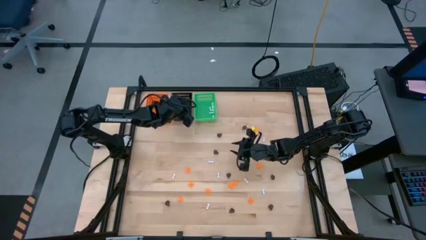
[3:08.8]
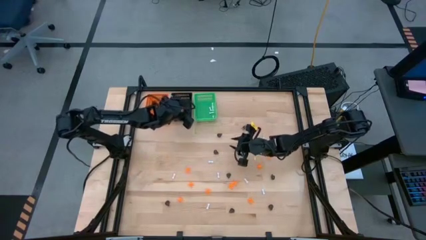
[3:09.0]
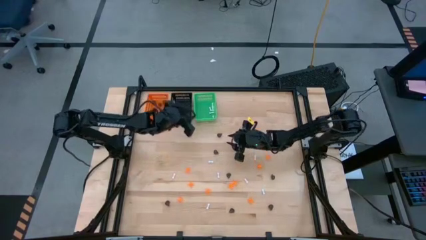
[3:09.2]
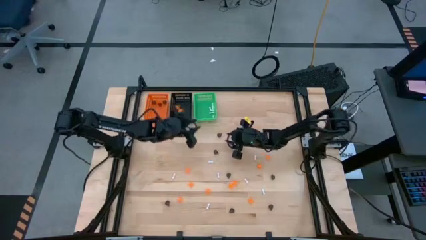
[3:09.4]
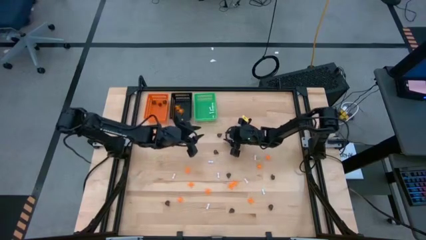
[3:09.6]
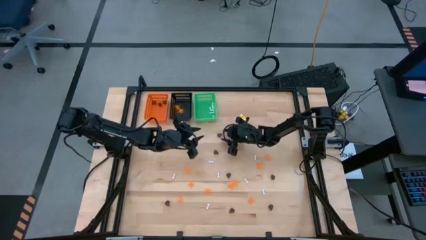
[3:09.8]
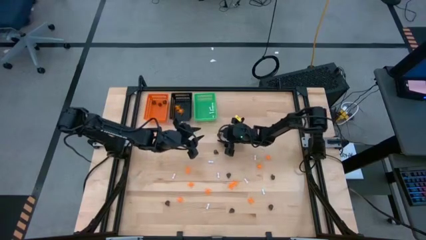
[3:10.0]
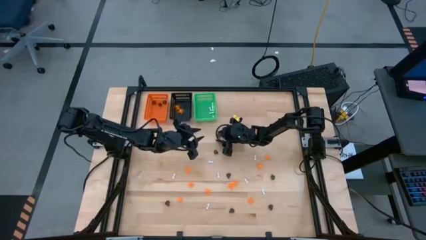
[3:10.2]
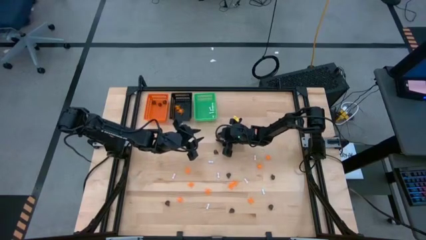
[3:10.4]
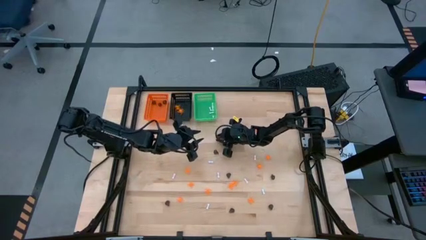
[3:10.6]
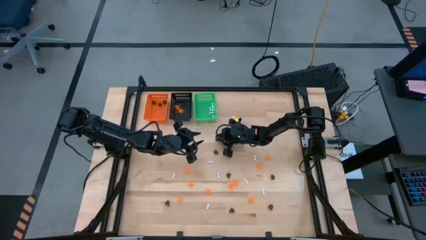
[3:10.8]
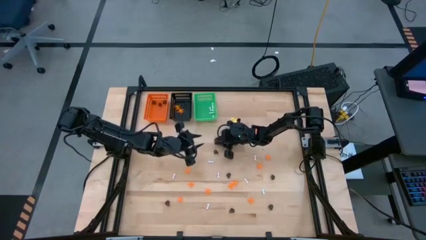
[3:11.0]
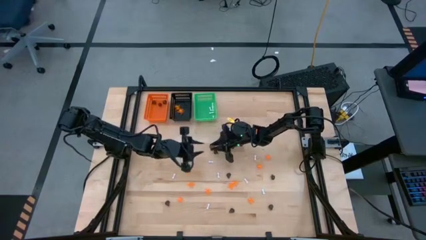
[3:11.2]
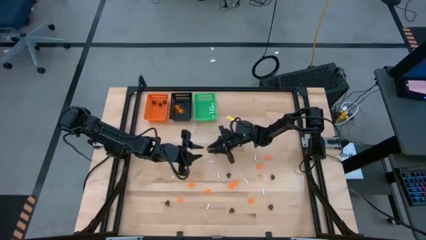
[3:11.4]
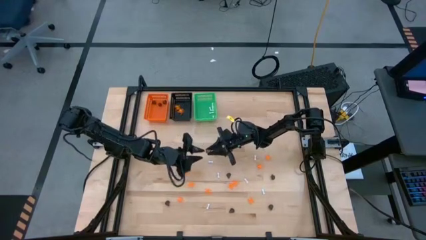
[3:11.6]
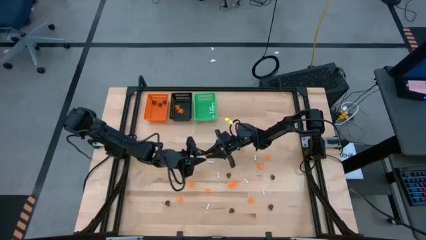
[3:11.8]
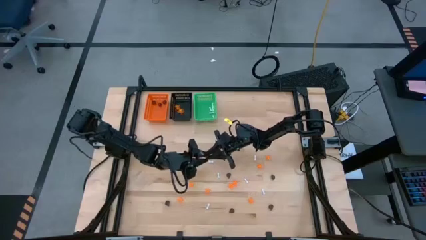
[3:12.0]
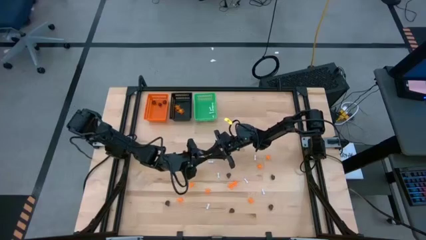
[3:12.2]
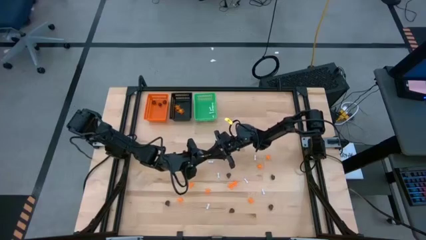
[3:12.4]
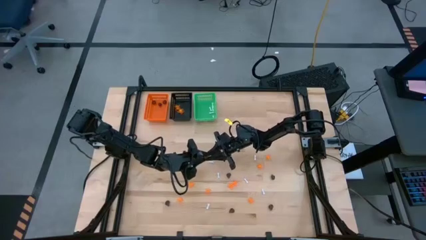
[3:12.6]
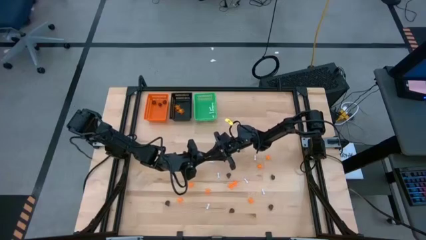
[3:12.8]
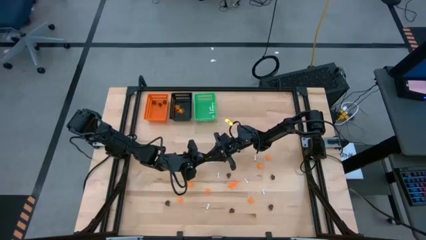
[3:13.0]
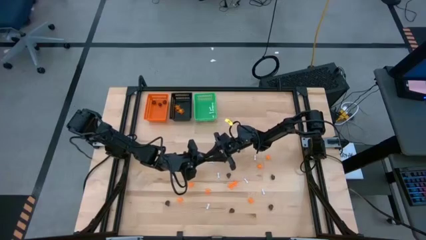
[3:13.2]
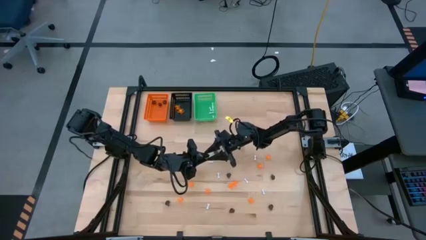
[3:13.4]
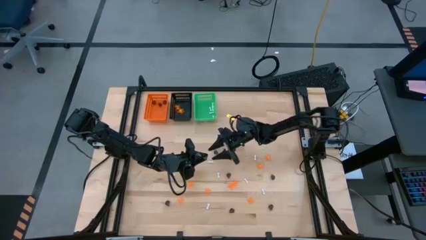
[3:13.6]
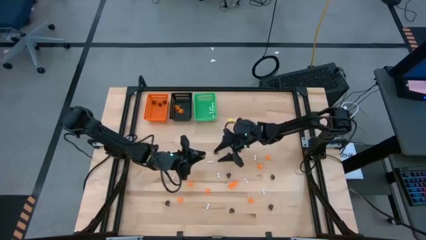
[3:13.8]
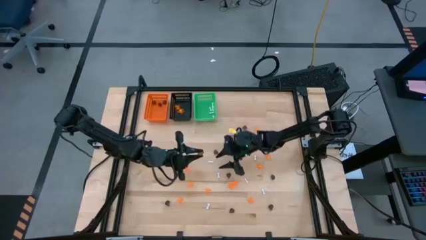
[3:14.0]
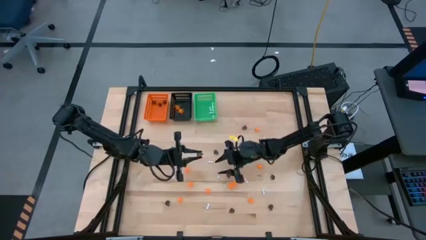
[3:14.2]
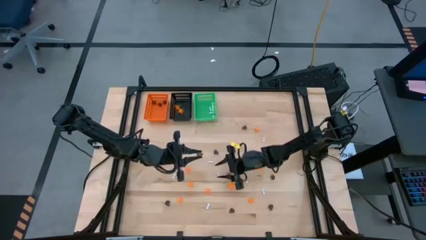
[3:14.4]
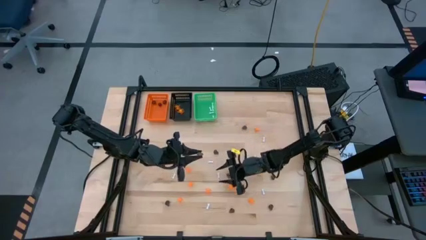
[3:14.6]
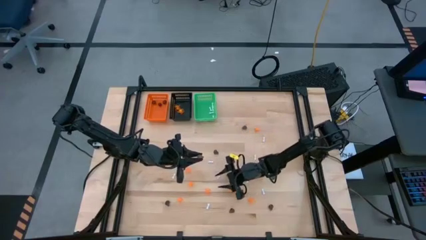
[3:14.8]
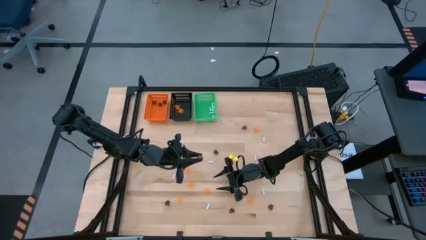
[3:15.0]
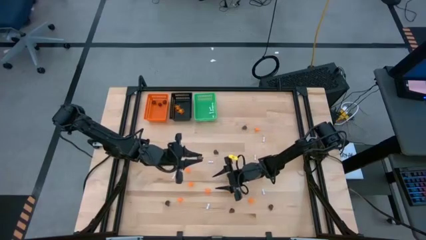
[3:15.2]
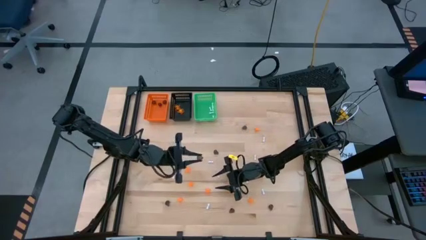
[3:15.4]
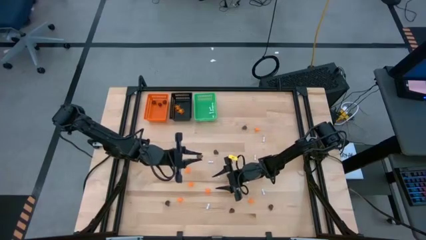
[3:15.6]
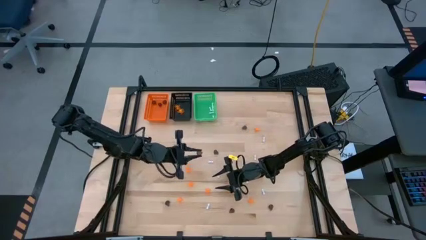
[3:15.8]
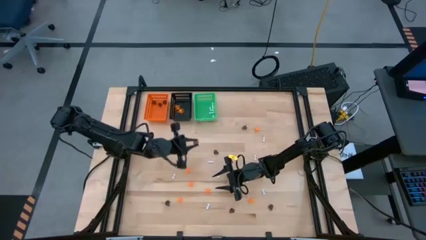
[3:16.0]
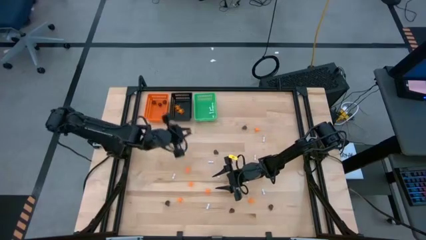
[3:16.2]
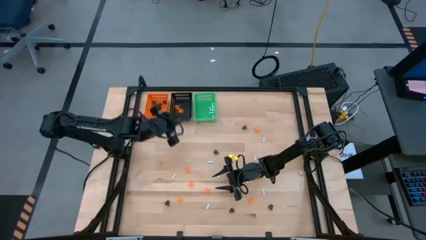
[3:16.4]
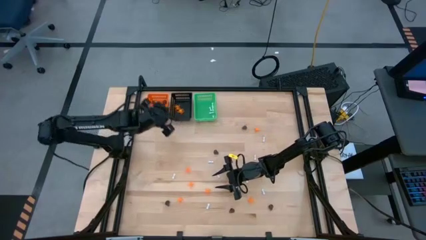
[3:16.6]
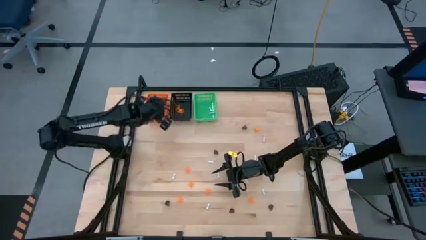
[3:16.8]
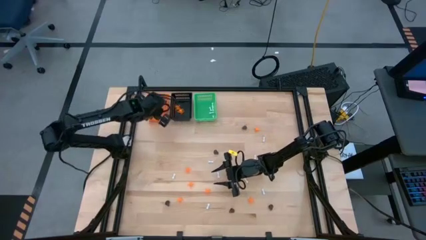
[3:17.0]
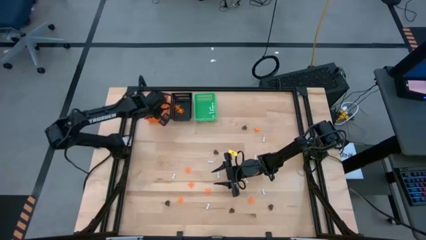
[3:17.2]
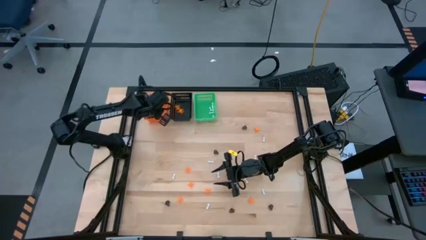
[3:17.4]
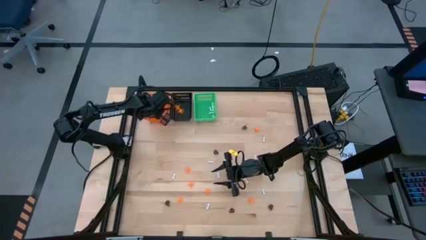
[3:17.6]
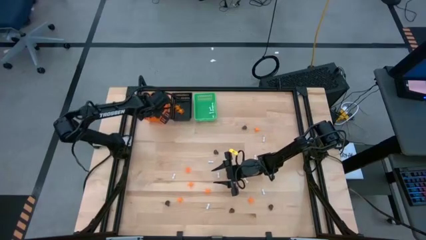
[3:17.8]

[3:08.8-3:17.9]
Task: Sort Halloween decoration
Put the black skull toy into the orange bin

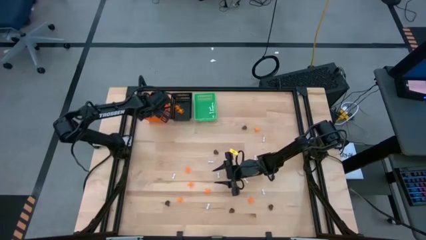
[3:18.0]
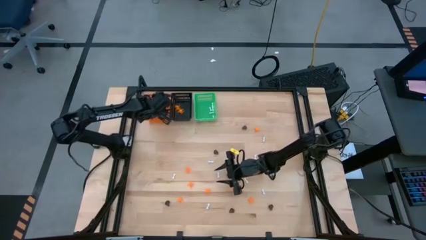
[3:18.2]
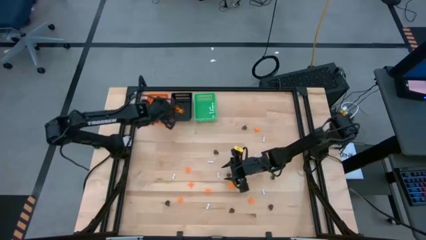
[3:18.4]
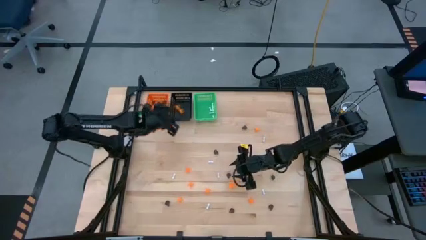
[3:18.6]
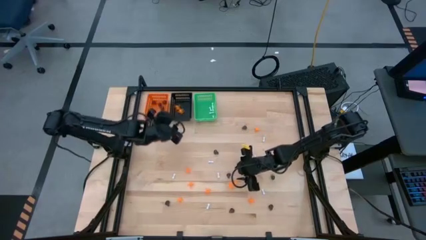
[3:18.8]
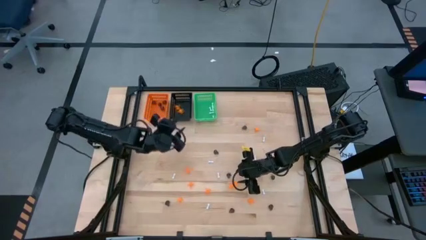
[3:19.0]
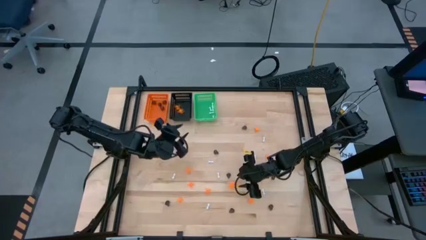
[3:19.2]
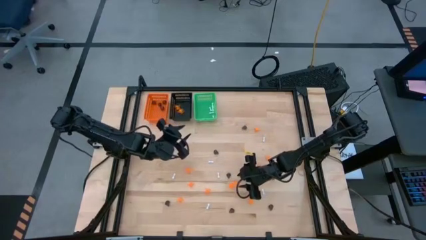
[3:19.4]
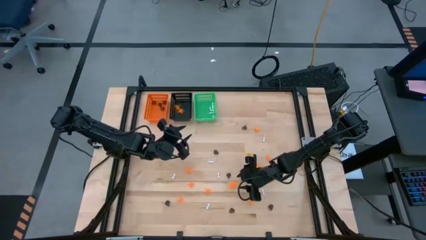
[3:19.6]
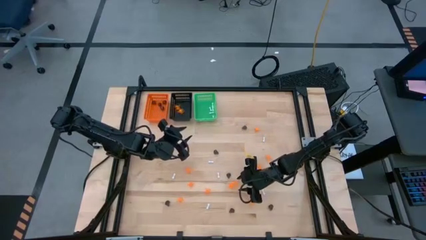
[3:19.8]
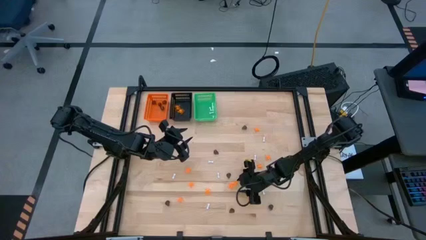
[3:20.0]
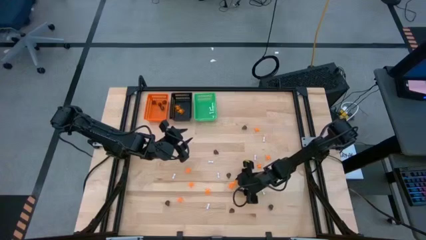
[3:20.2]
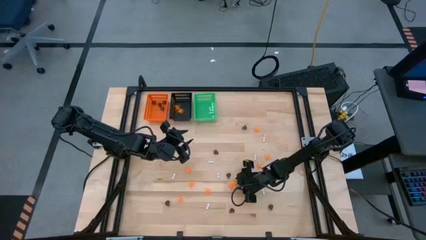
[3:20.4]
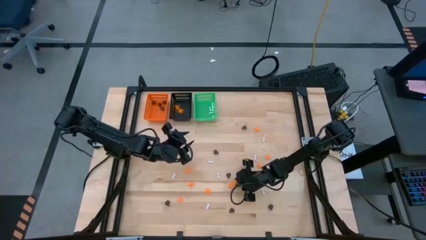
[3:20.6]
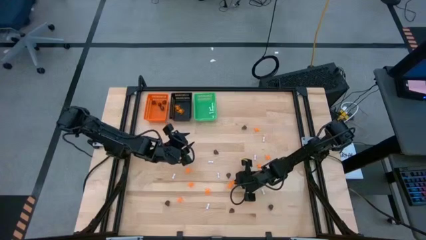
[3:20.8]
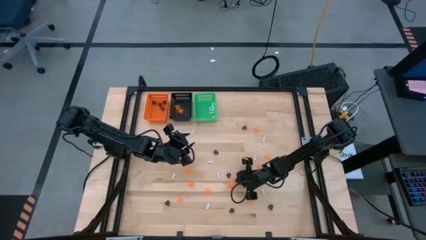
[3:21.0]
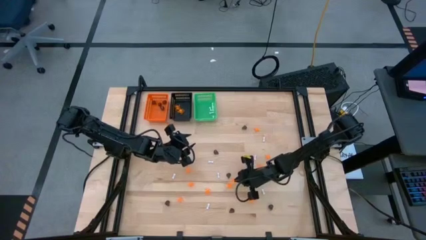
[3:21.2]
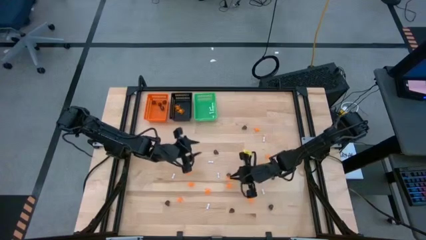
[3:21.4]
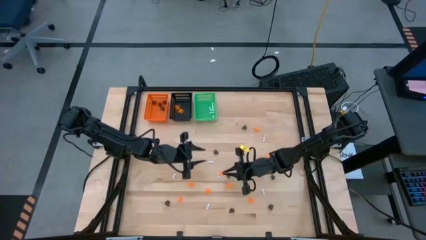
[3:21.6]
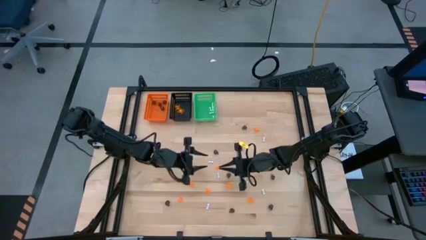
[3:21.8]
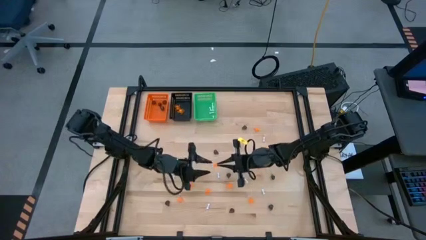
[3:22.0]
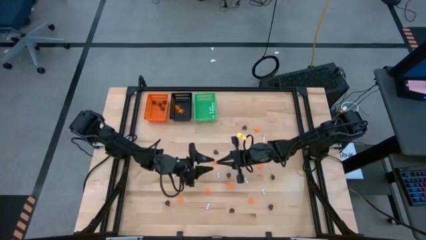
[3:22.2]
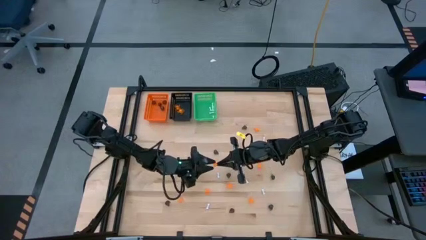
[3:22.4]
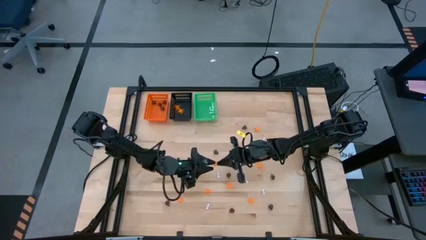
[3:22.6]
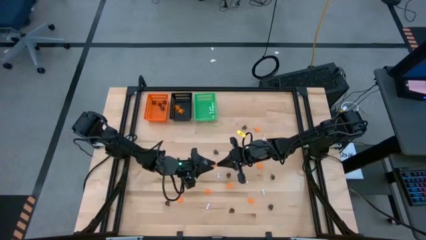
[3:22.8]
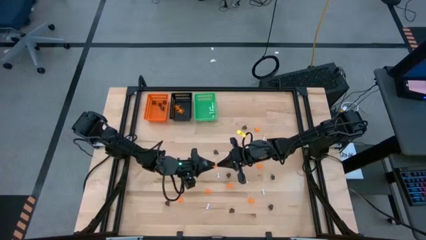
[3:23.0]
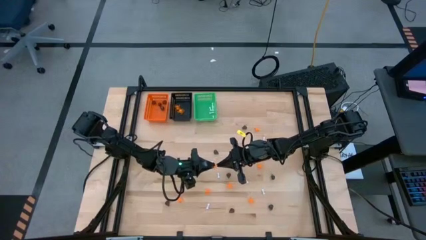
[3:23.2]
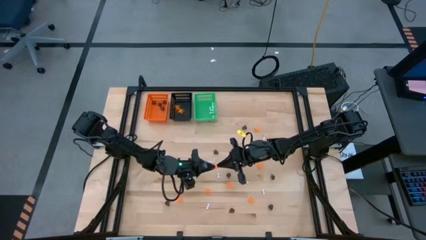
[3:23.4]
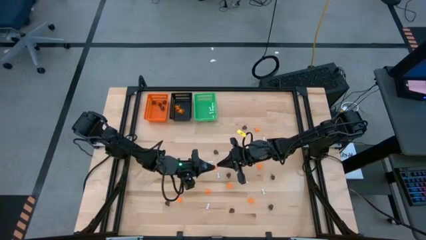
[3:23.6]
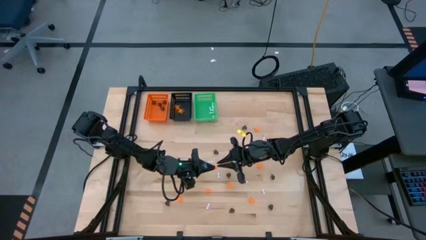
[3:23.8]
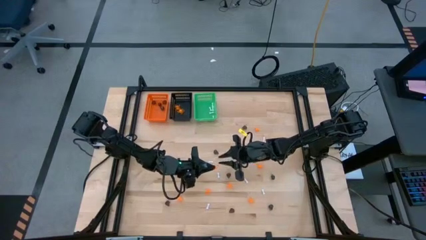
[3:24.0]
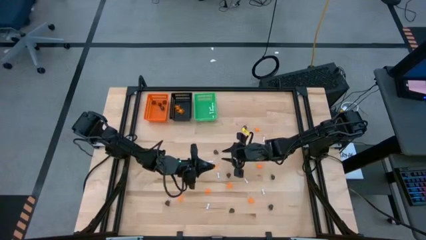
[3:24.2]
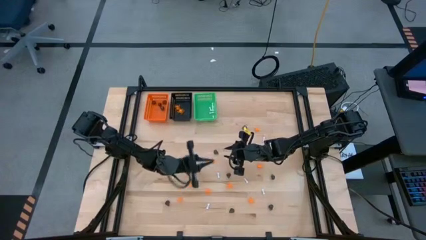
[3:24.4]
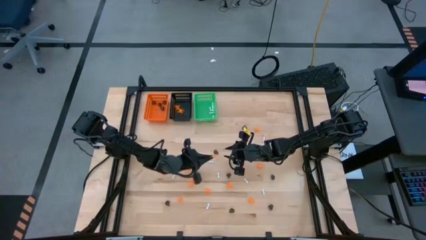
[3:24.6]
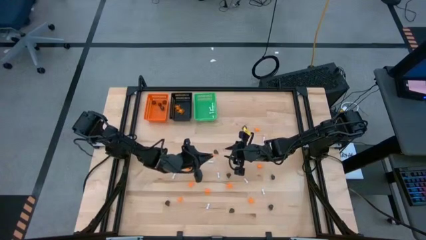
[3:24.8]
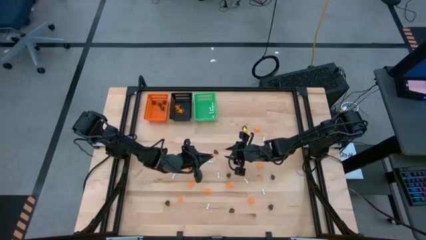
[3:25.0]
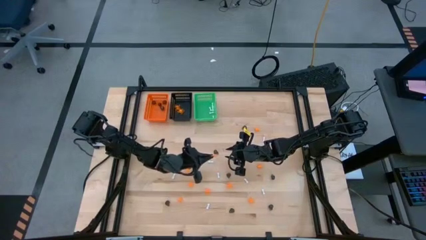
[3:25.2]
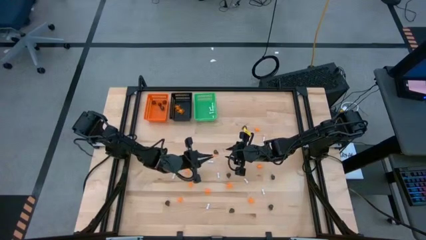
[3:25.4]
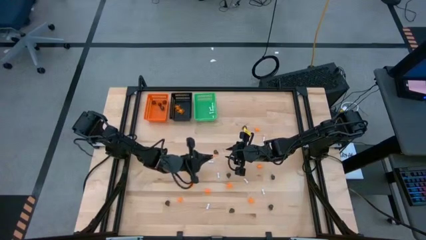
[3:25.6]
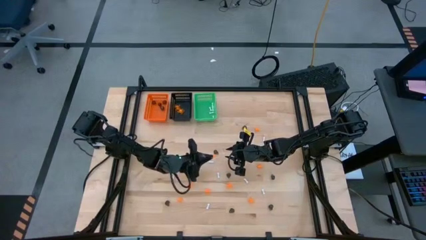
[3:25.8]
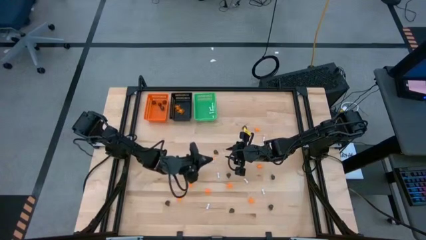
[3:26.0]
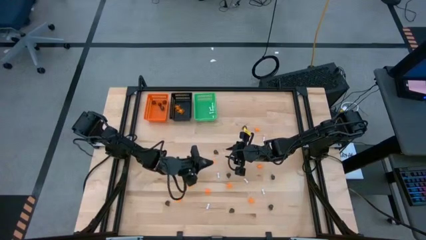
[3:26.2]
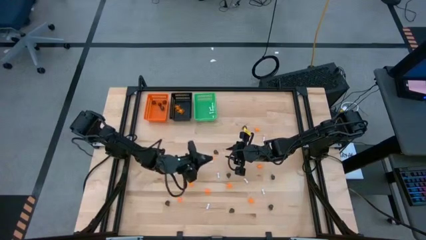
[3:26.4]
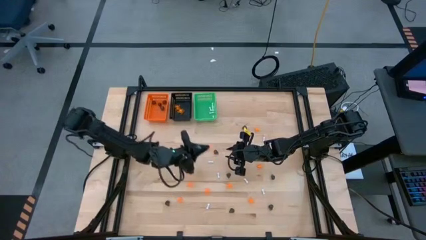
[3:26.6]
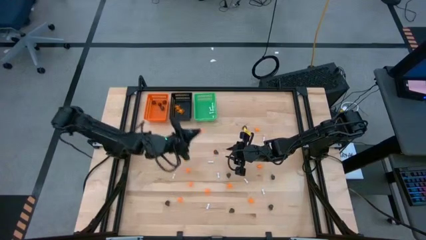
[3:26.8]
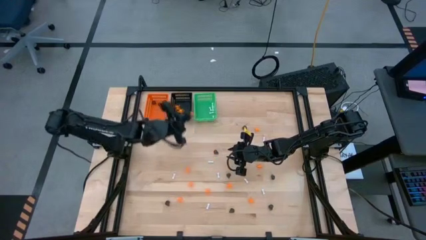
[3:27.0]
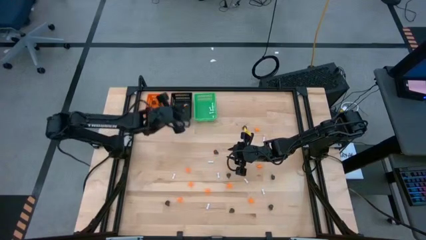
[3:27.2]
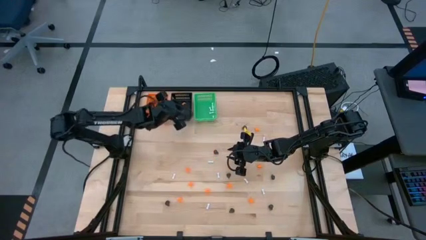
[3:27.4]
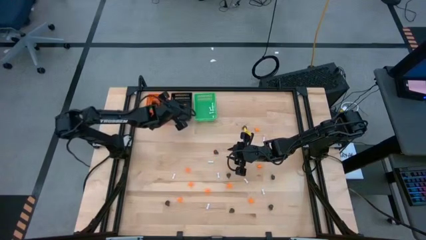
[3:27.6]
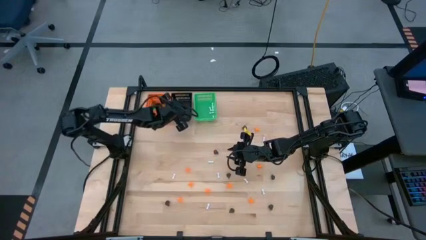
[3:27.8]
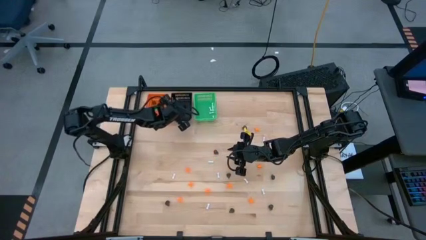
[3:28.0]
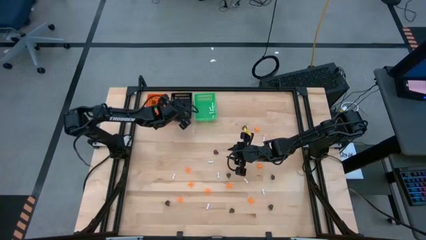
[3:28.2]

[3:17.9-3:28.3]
Put the orange spider toy into the black bin
